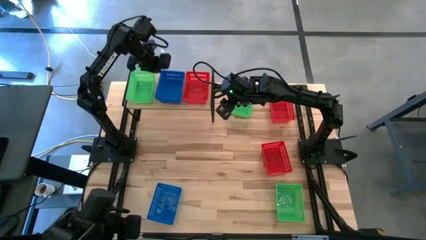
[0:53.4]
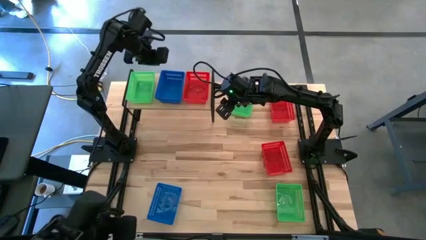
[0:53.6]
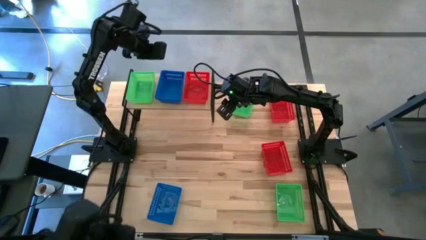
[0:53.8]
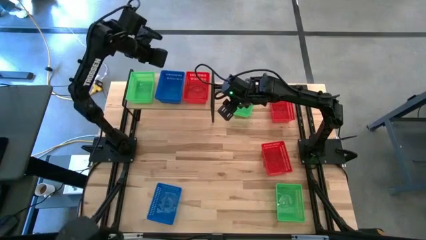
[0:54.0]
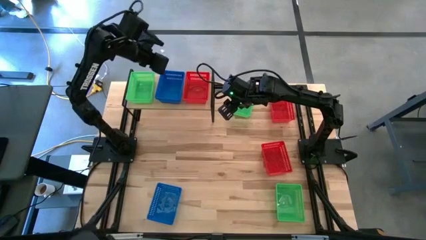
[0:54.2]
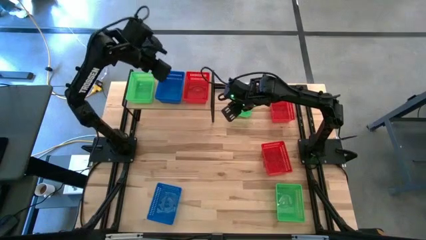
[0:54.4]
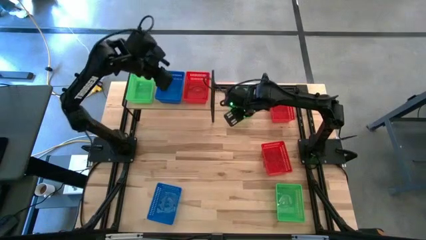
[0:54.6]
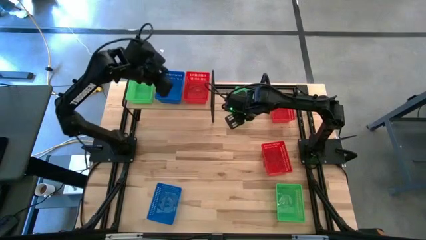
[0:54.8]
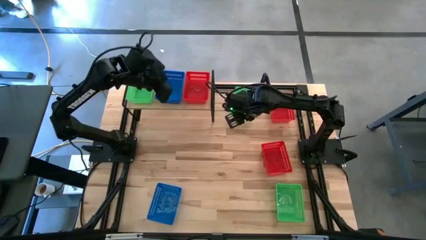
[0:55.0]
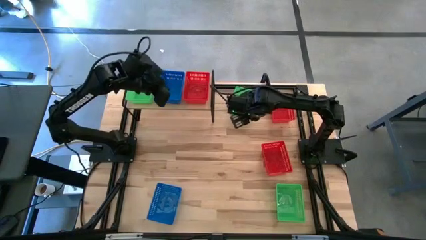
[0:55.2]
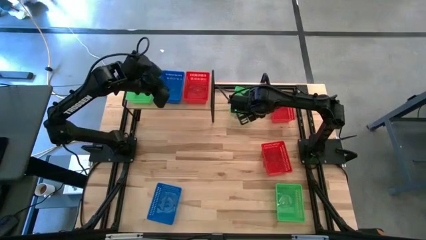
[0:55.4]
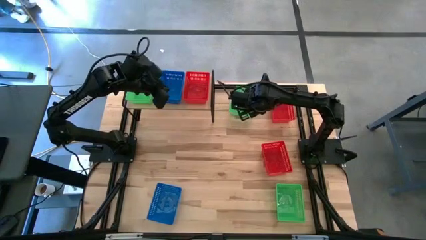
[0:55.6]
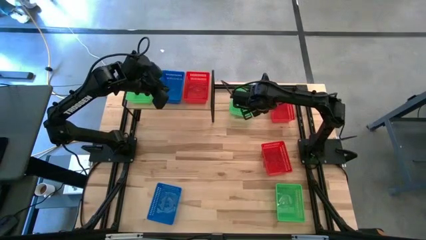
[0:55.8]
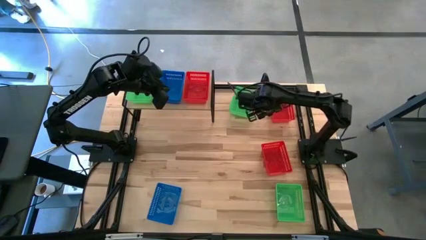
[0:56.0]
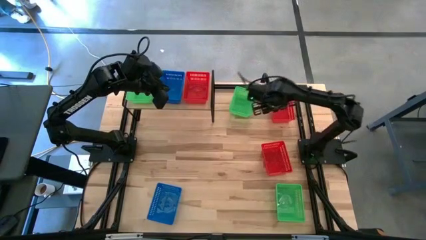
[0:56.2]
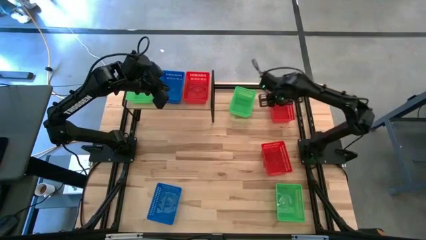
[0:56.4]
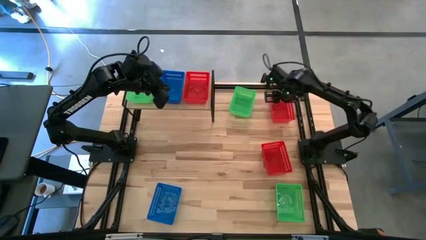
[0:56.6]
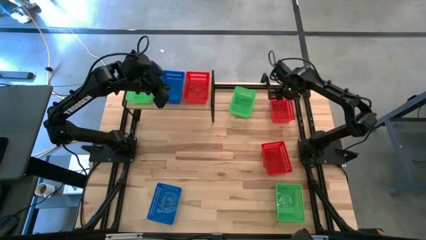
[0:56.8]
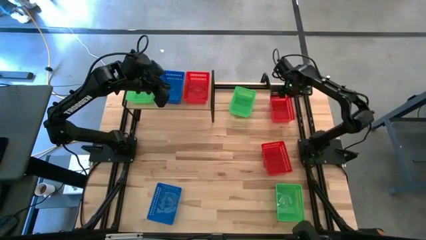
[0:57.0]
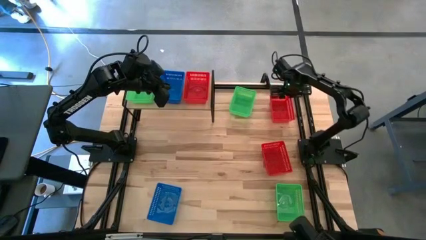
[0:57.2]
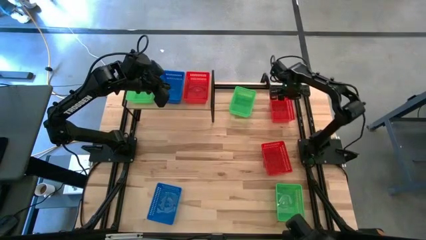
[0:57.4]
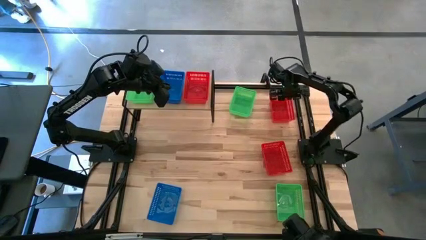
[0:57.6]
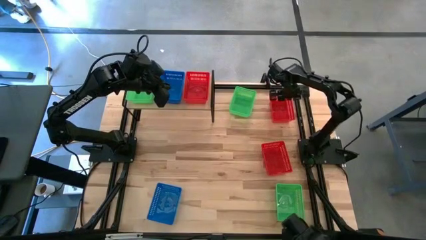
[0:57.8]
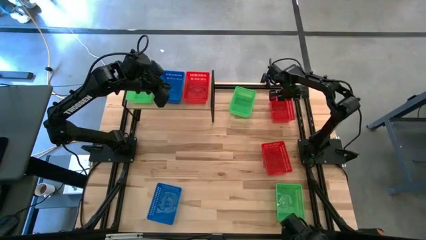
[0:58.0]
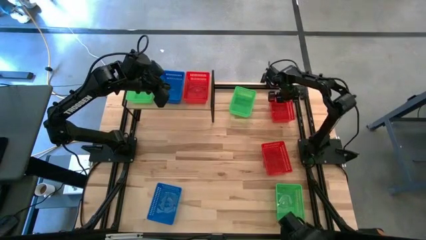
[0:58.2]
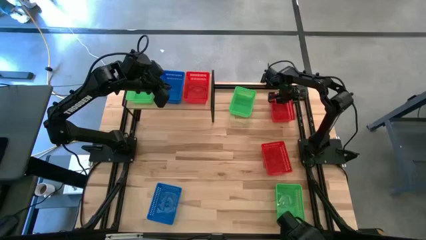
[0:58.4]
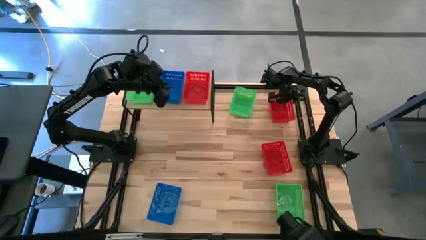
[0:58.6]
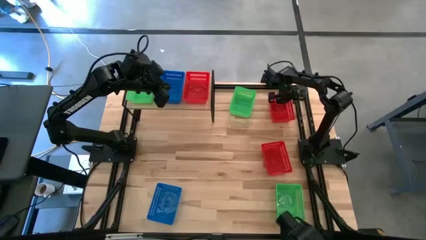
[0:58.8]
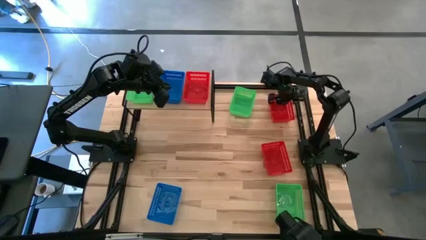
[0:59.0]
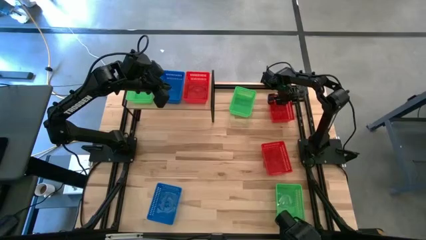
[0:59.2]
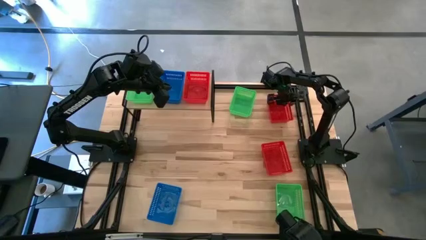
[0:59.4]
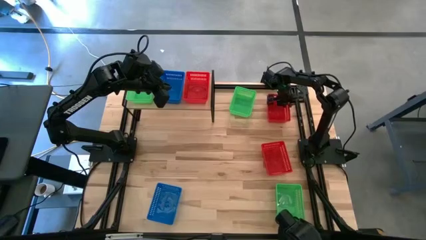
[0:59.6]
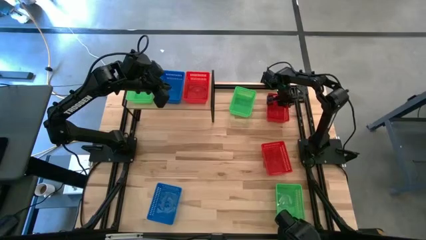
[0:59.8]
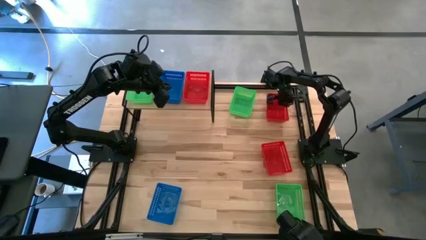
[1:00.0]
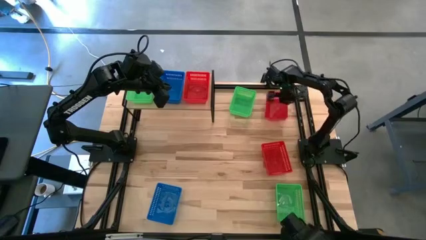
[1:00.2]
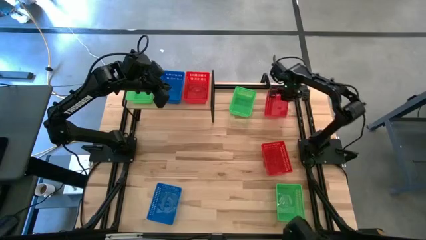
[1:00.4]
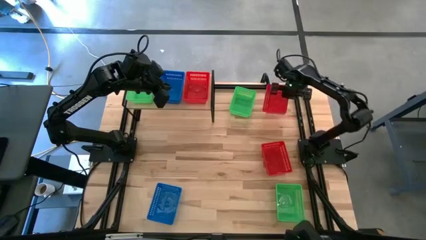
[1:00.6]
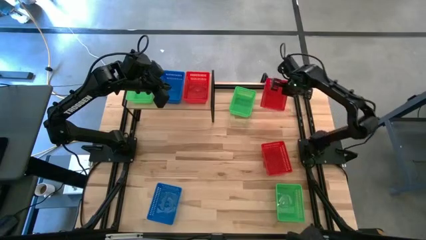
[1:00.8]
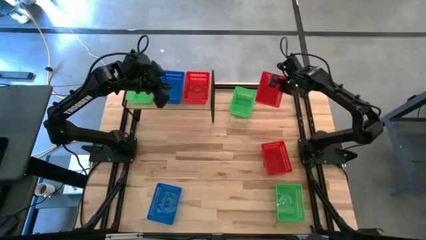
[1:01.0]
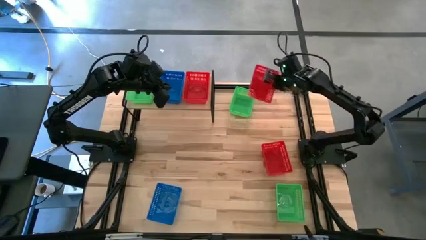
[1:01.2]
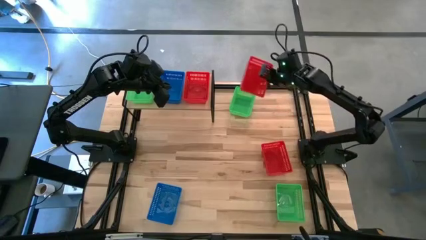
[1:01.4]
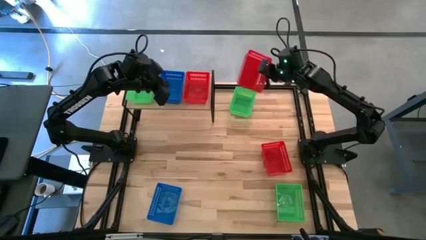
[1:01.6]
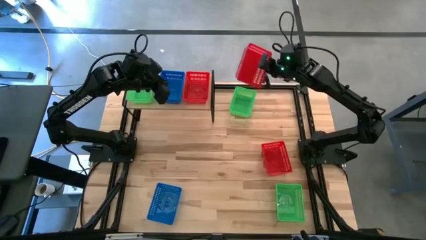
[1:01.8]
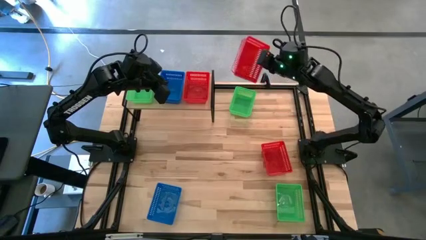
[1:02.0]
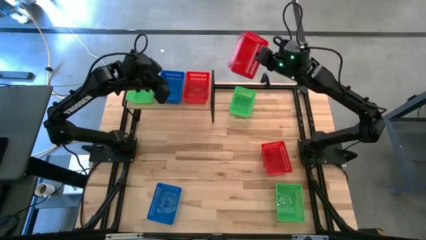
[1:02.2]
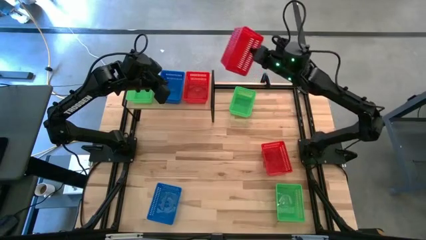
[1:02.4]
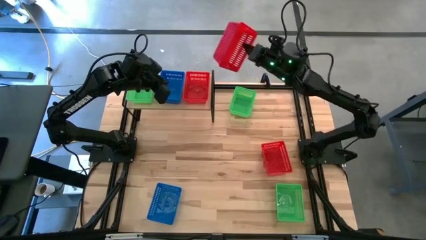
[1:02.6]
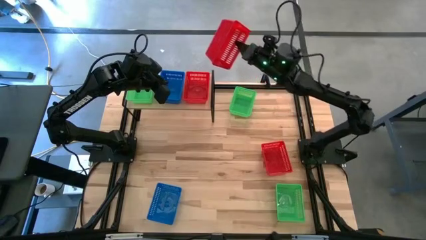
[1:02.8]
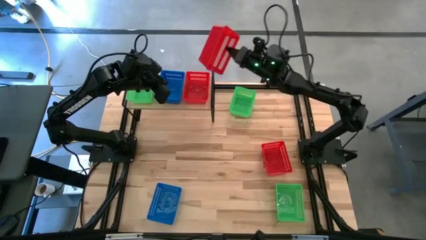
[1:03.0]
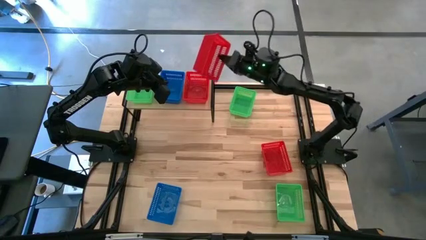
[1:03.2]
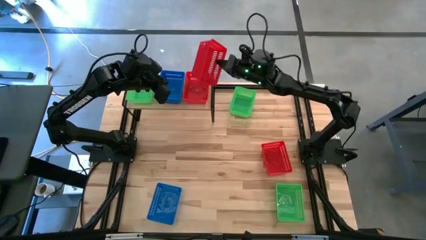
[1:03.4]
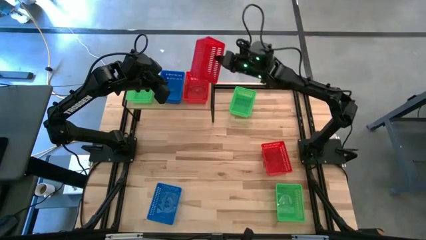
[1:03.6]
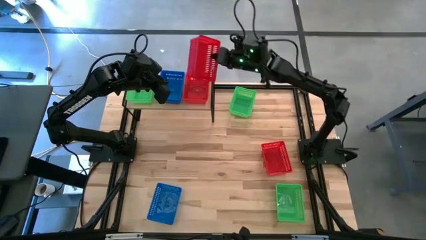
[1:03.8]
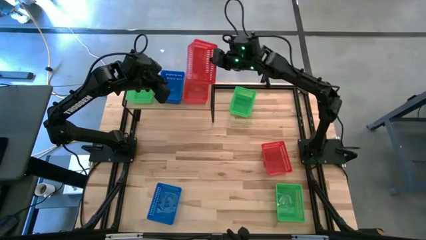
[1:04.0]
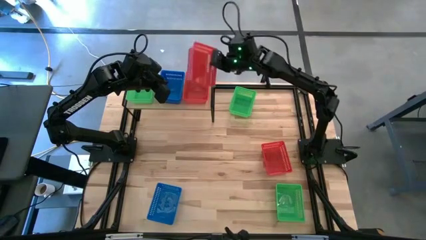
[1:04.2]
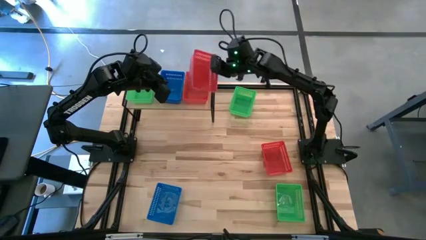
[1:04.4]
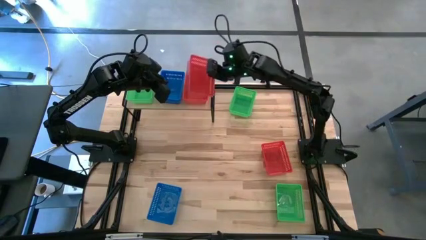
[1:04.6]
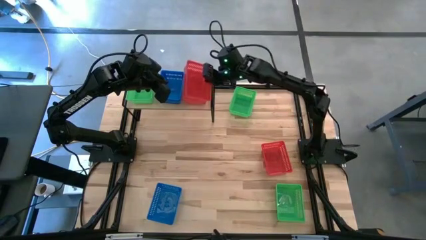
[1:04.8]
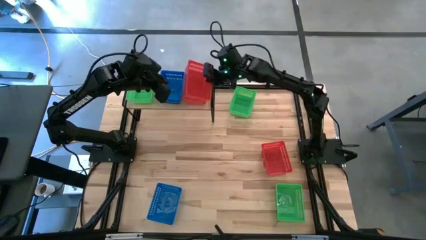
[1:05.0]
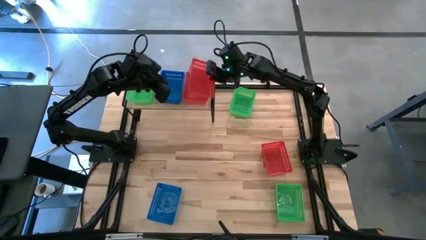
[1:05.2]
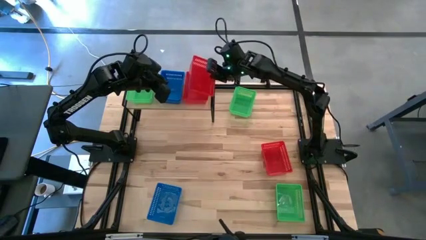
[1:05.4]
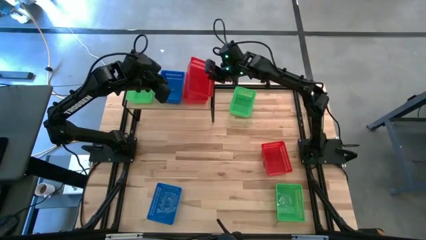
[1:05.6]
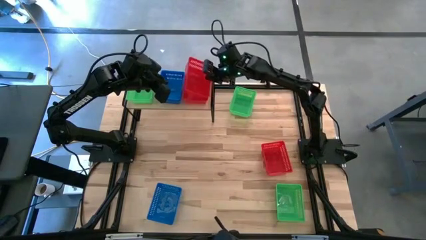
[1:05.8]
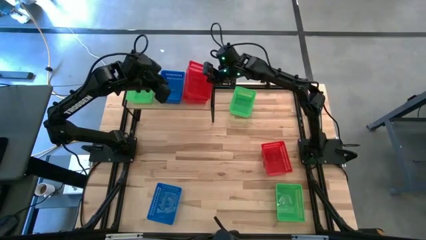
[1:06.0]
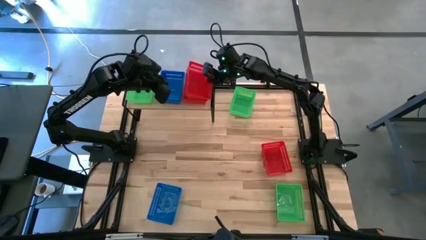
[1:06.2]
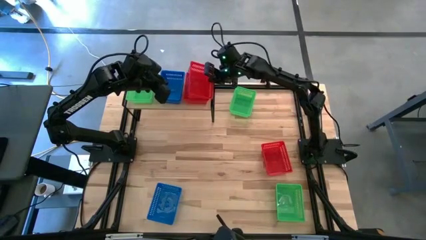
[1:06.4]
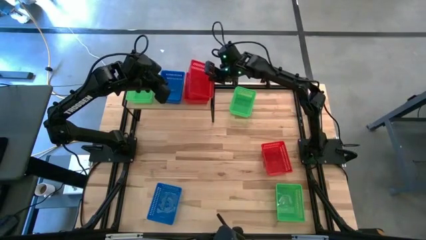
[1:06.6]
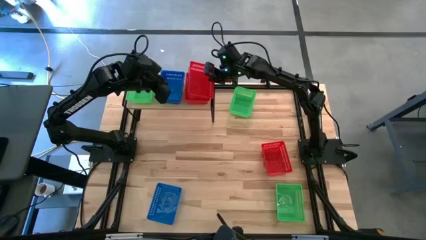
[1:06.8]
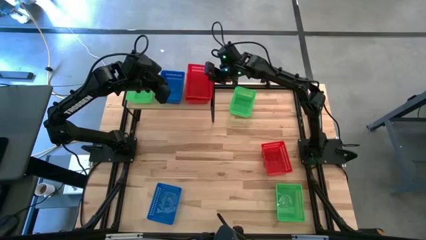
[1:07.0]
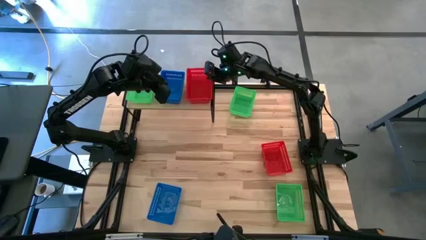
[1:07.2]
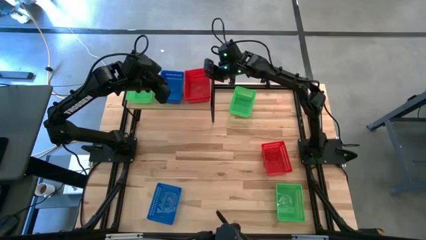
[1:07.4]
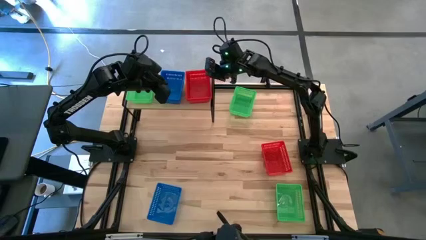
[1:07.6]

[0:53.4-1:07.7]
Task: Stack baskets on shelf by color
Stack the top red bin on top of the red bin on the shelf

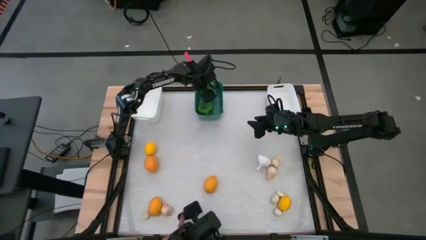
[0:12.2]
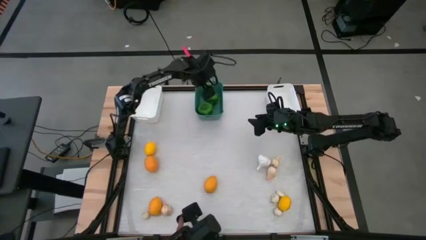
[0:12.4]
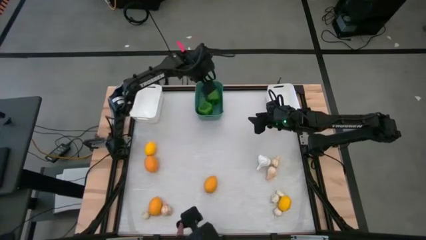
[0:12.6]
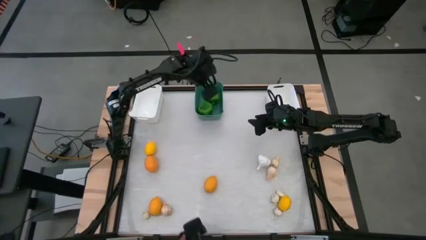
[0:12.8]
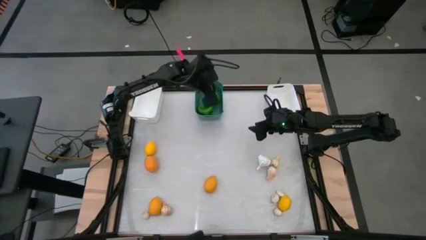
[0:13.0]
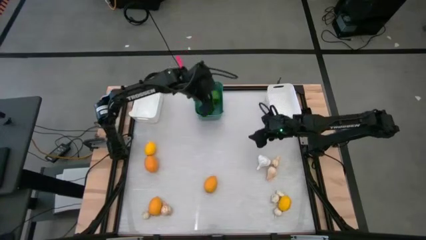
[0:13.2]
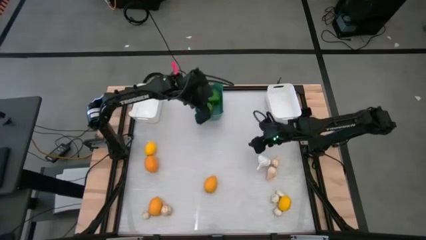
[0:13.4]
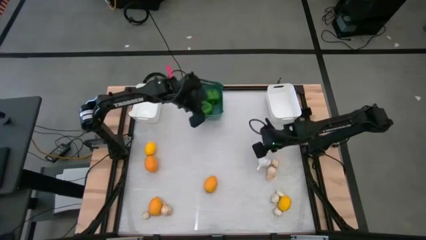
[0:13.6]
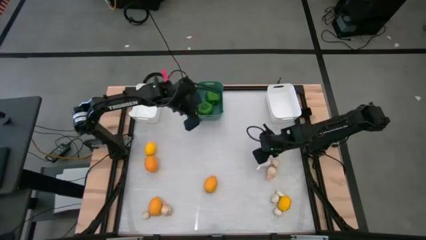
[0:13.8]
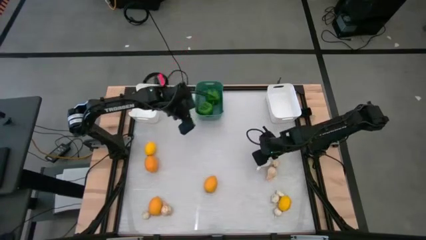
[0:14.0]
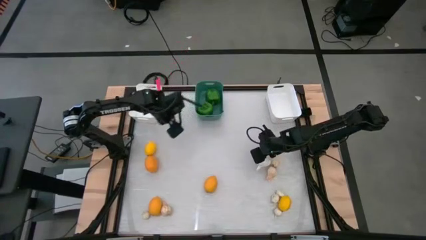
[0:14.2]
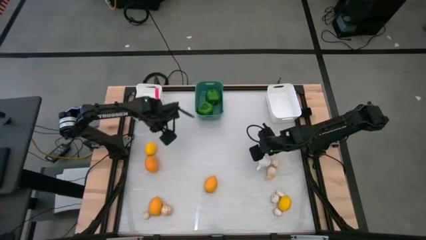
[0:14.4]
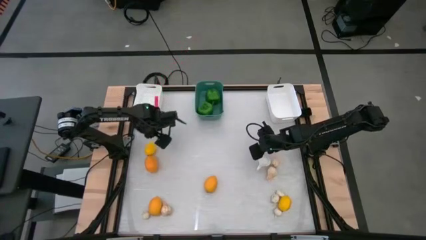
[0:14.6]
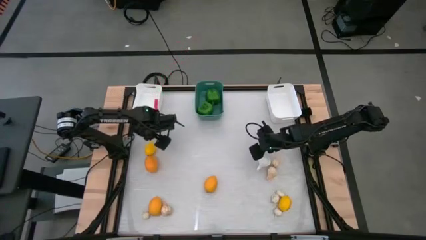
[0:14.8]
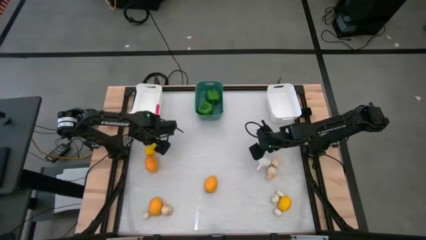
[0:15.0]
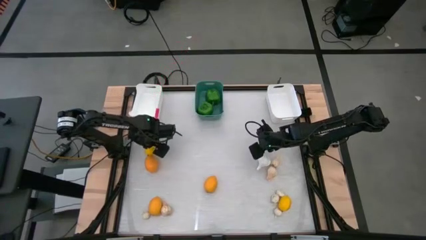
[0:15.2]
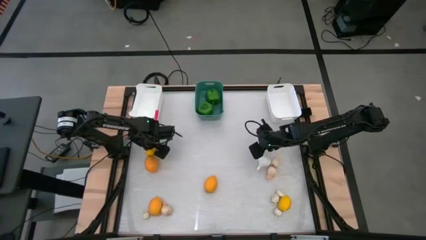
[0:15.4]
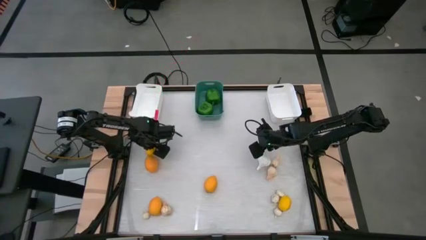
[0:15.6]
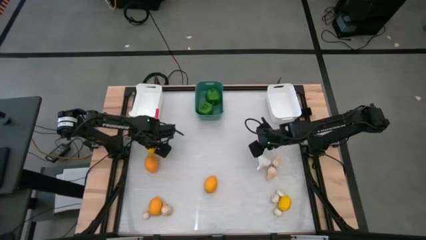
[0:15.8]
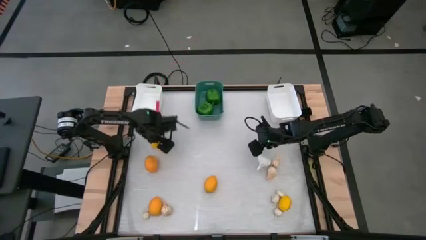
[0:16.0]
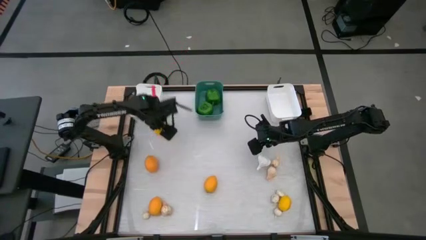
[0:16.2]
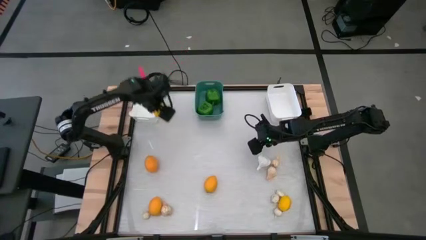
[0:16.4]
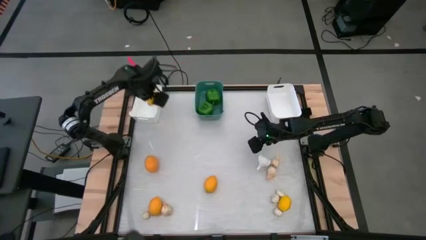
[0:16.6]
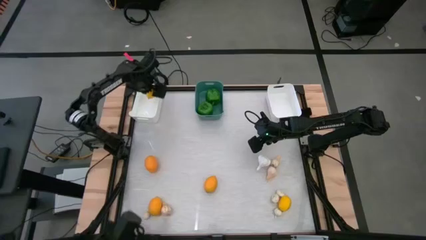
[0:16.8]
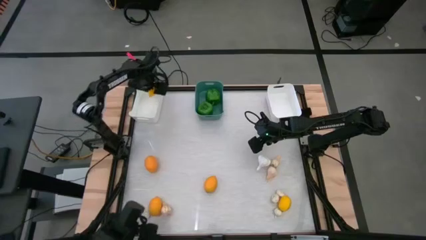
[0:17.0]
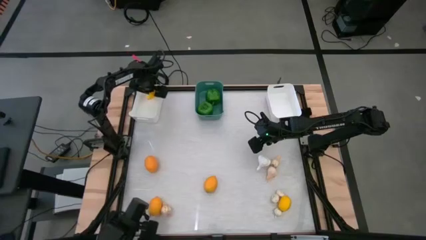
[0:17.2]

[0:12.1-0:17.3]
Task: Sort produce into baskets
Put the top left yellow lemon into the left white bin
